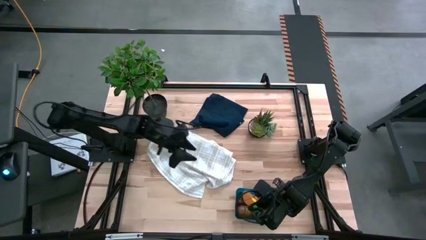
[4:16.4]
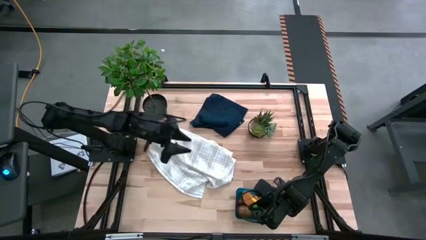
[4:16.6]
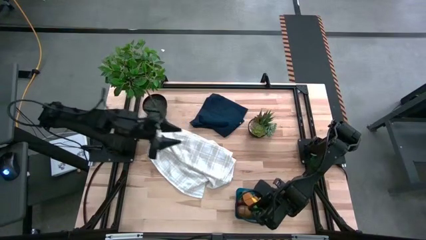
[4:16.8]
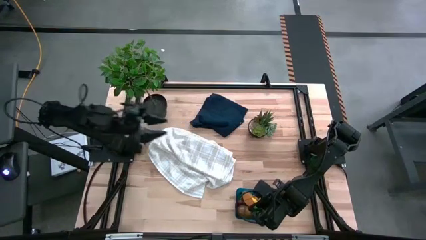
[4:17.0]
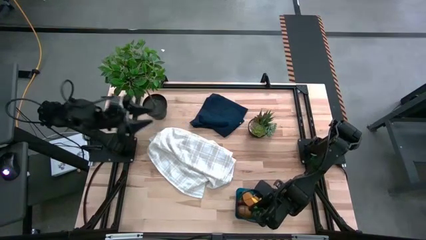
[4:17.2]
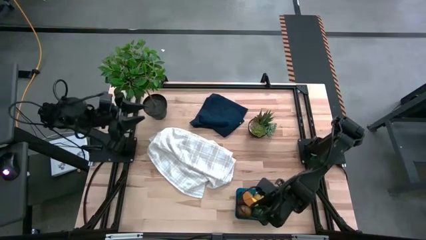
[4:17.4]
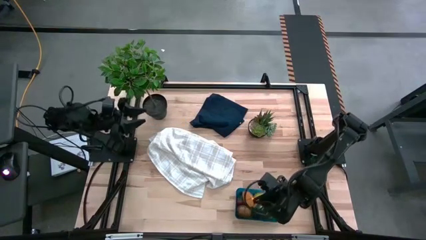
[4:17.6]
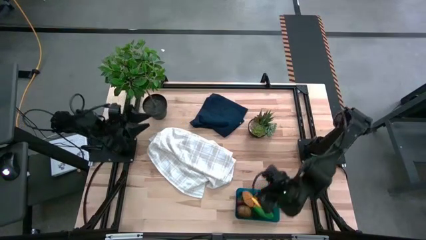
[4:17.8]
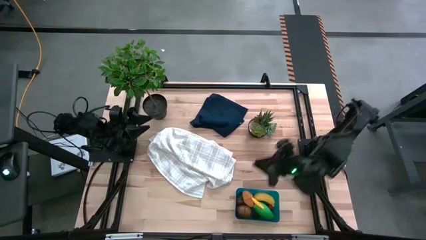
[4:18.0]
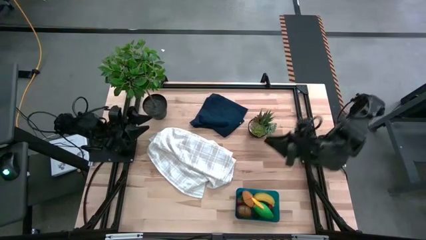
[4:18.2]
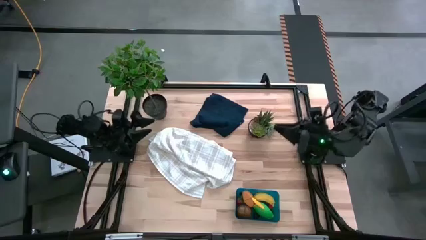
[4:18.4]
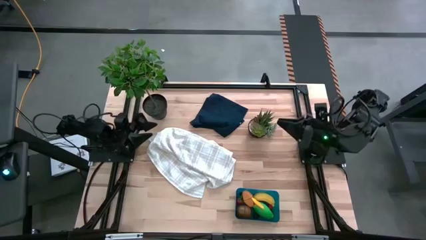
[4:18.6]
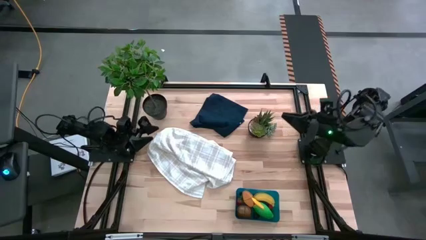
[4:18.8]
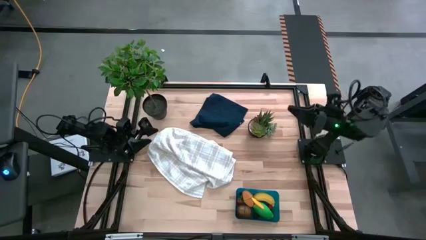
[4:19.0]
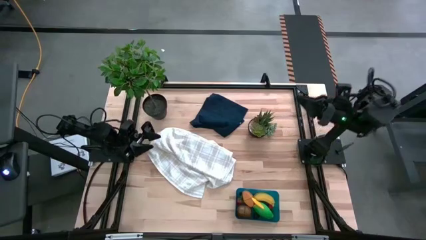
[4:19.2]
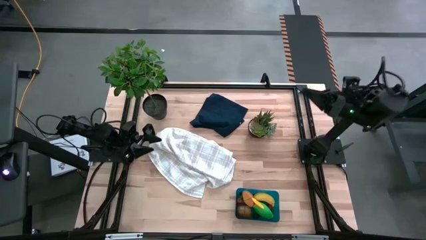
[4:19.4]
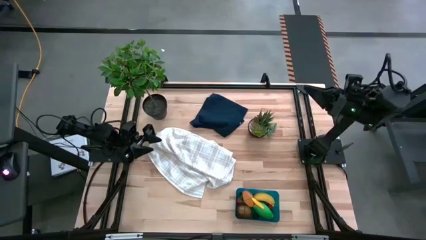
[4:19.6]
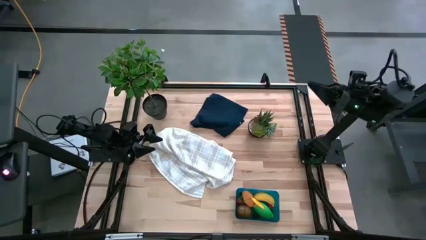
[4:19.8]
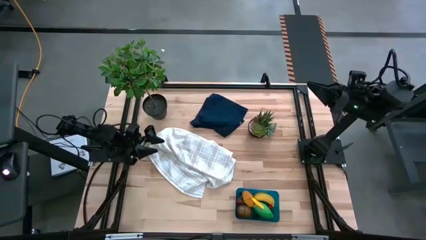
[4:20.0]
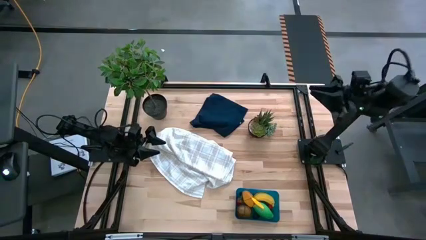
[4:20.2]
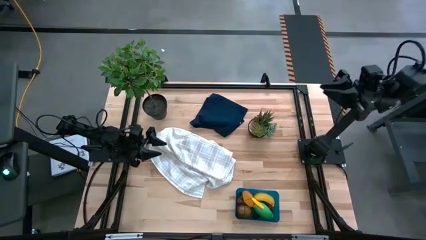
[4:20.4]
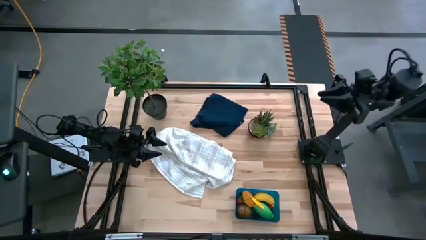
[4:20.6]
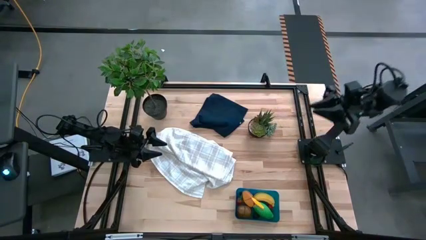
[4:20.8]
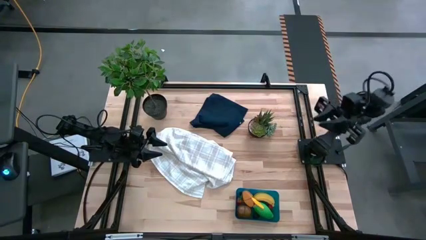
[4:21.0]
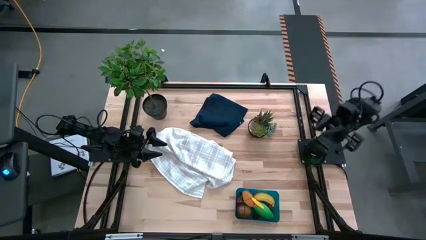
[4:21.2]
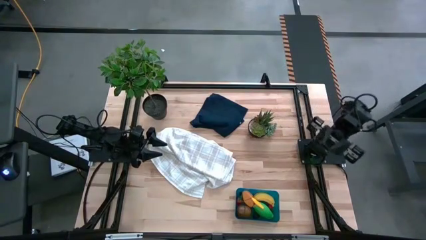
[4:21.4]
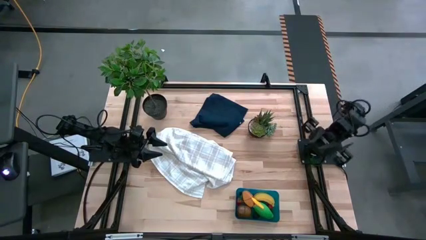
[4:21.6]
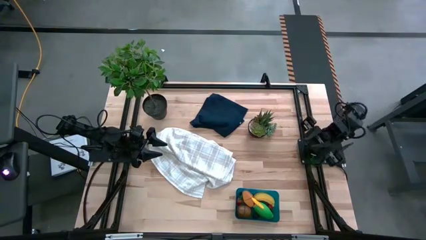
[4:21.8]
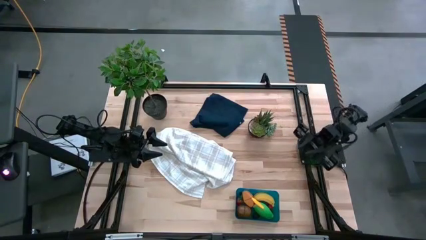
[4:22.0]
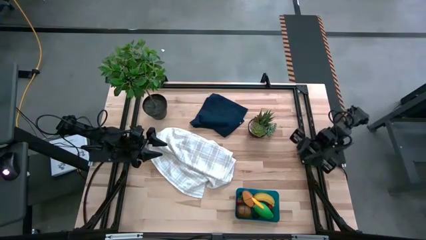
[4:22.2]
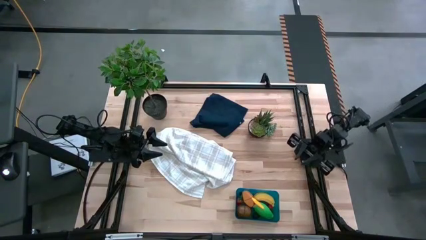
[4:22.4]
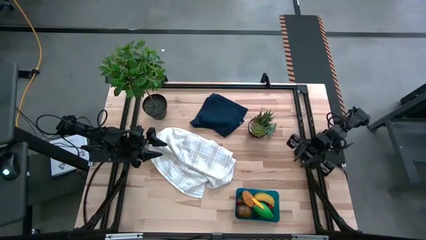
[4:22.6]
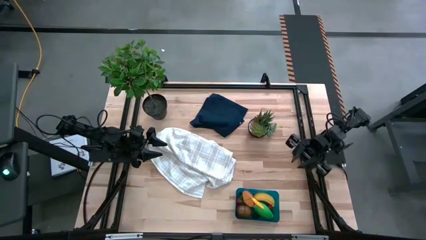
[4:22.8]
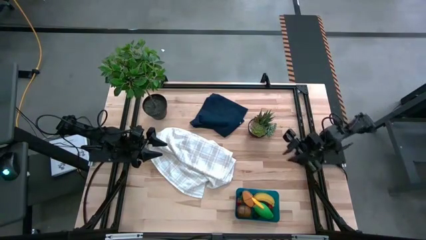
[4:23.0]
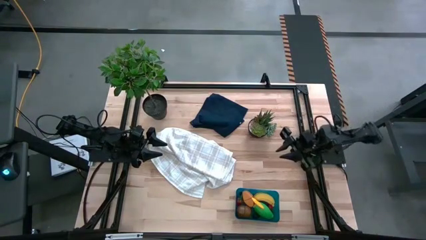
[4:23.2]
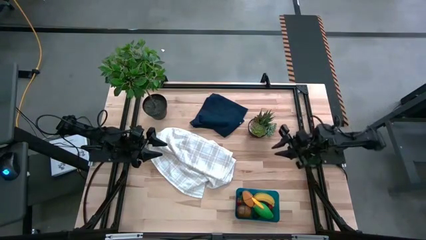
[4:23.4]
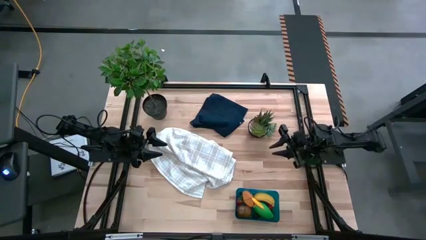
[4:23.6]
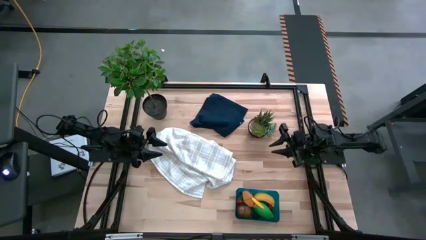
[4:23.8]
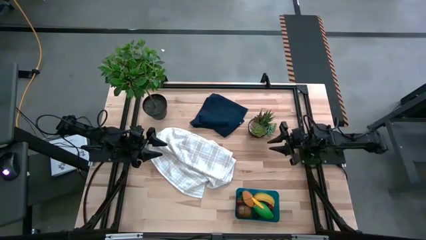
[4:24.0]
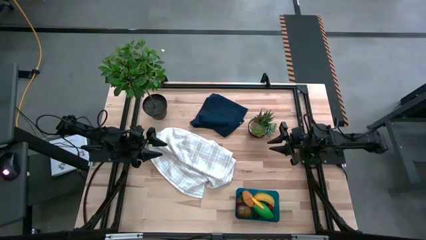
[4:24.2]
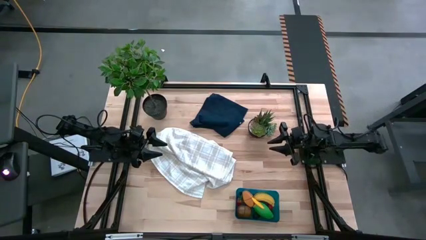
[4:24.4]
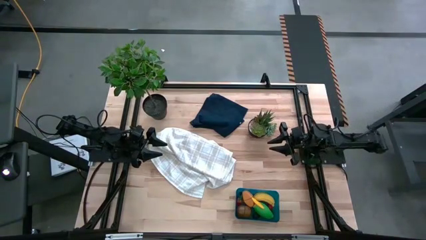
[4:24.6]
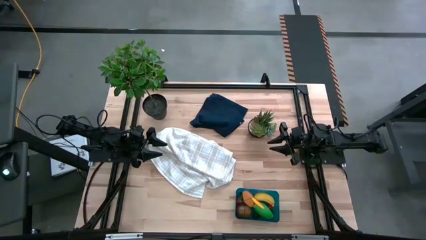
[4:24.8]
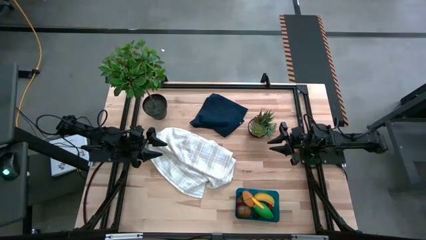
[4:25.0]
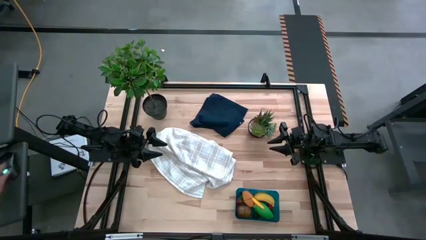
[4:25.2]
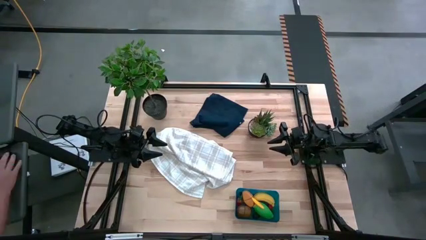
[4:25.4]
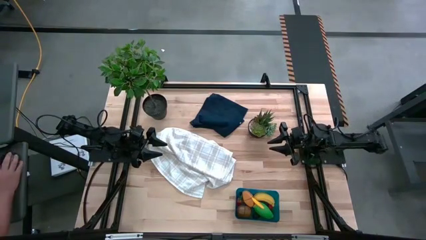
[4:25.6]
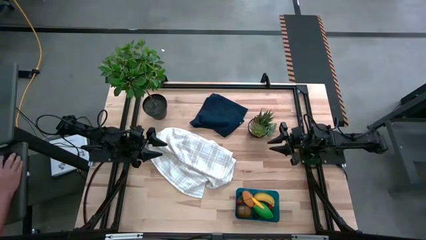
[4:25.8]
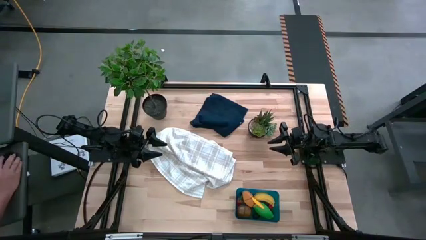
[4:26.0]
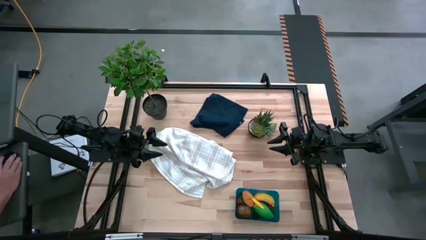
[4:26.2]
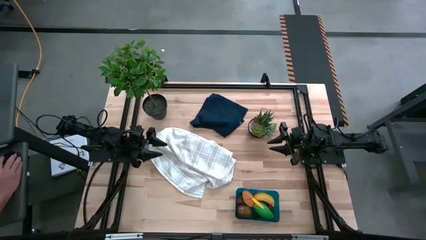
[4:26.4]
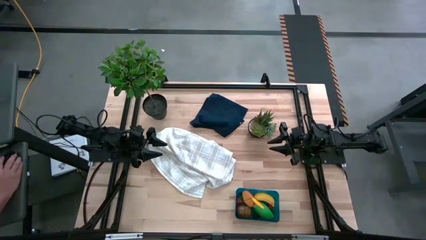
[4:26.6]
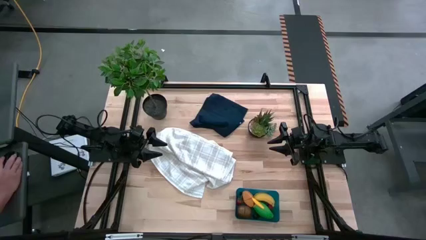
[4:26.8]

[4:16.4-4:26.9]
Task: Pick and placing Produce into tupperware
Return to Home Position

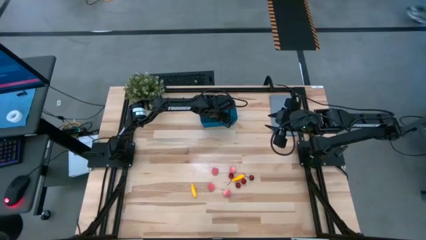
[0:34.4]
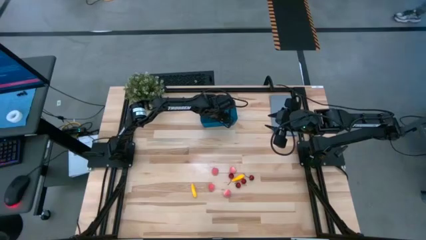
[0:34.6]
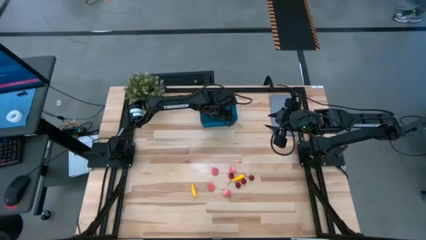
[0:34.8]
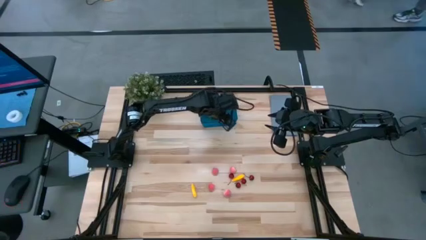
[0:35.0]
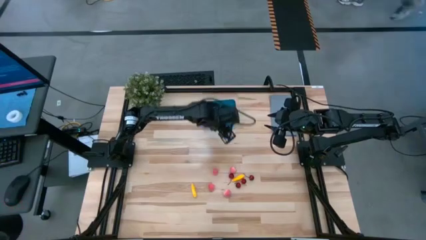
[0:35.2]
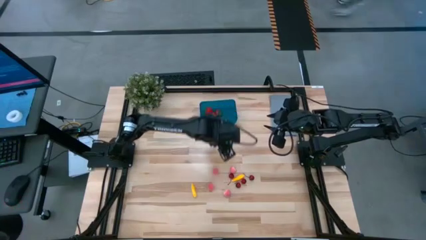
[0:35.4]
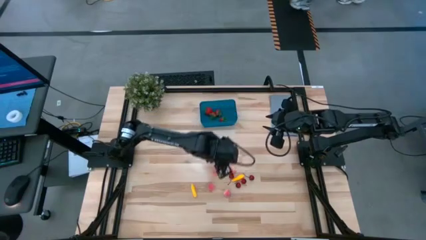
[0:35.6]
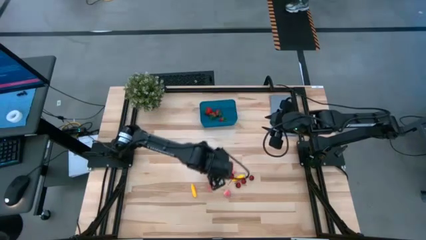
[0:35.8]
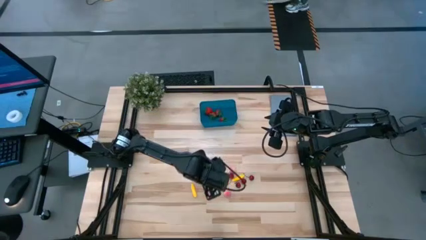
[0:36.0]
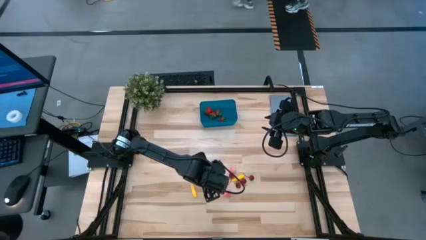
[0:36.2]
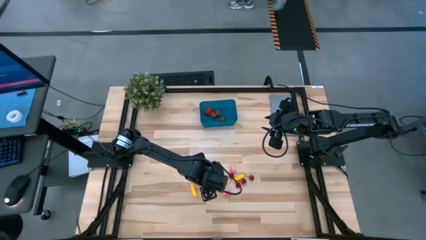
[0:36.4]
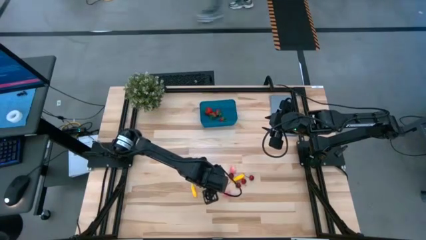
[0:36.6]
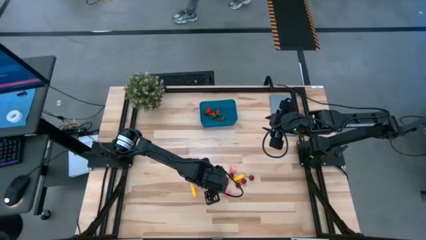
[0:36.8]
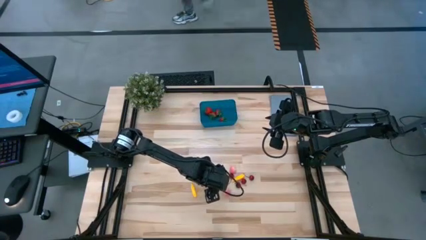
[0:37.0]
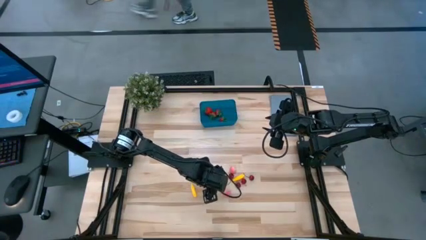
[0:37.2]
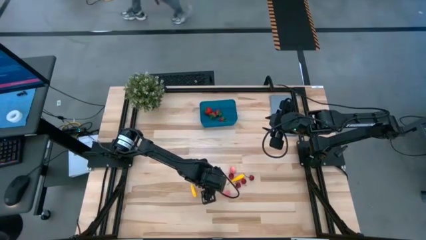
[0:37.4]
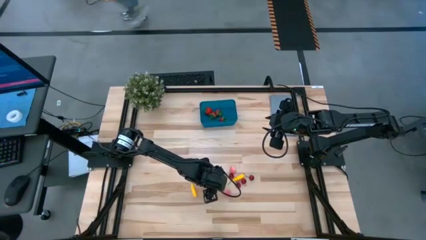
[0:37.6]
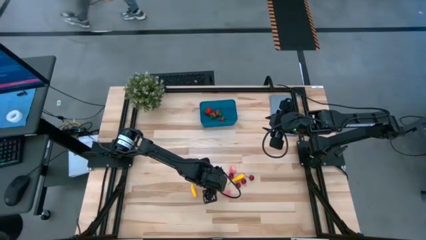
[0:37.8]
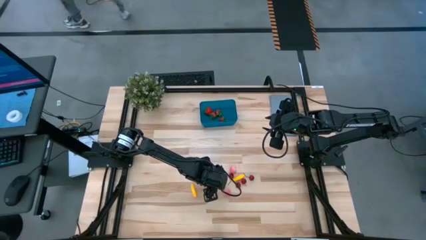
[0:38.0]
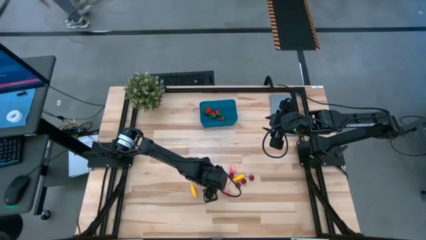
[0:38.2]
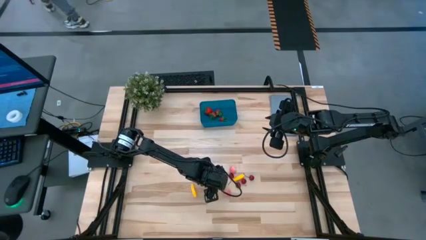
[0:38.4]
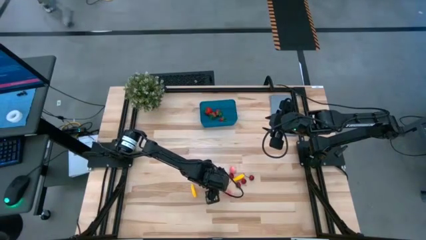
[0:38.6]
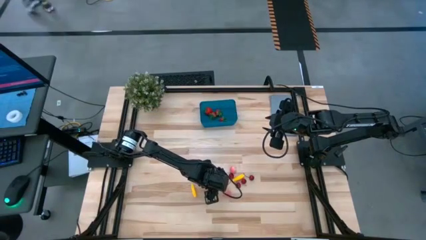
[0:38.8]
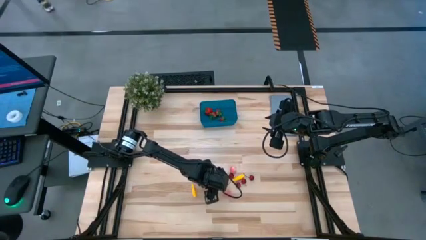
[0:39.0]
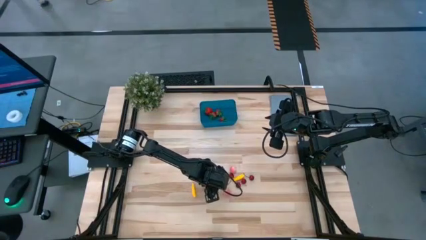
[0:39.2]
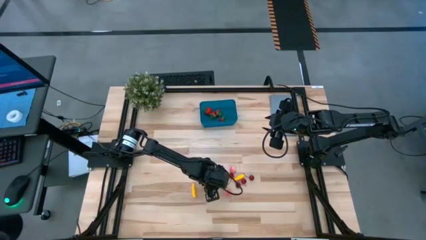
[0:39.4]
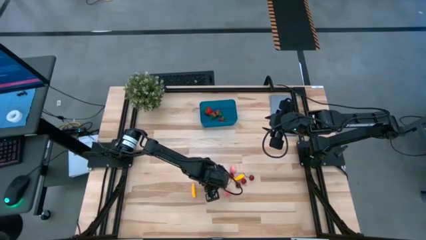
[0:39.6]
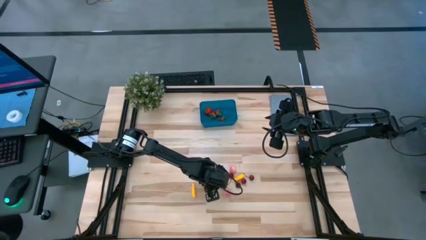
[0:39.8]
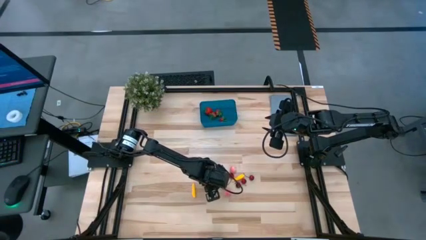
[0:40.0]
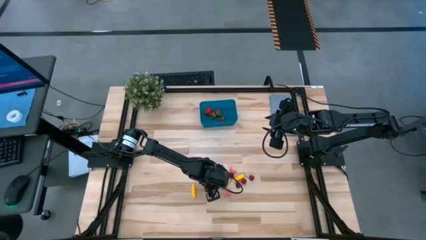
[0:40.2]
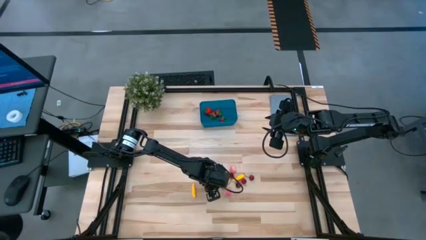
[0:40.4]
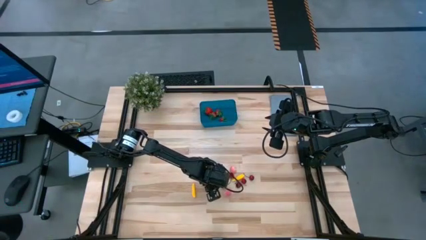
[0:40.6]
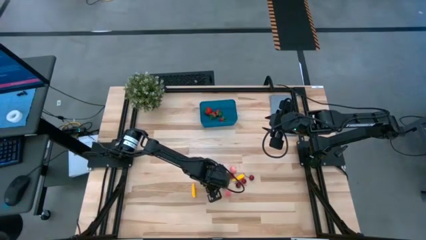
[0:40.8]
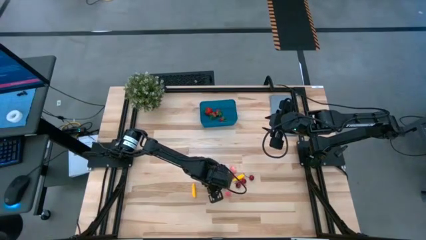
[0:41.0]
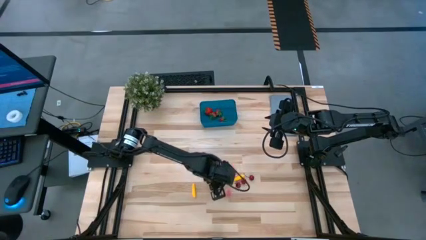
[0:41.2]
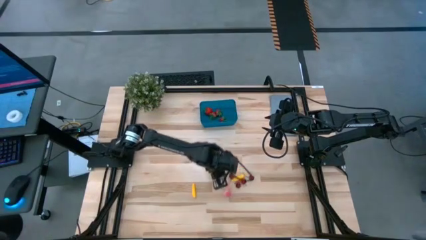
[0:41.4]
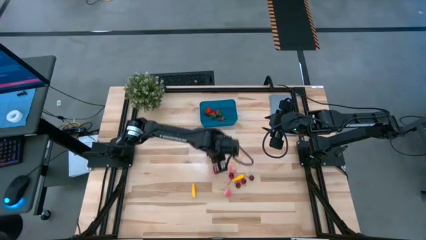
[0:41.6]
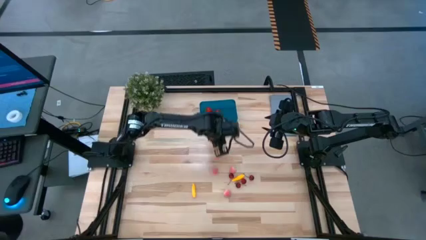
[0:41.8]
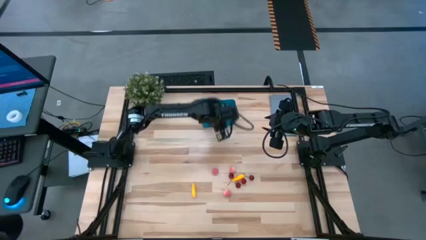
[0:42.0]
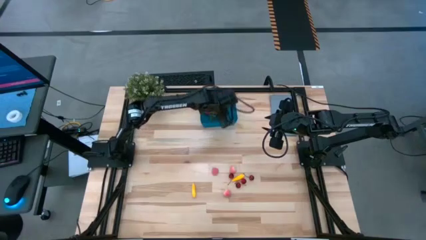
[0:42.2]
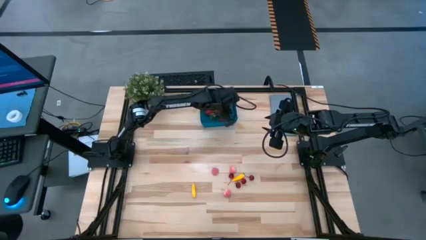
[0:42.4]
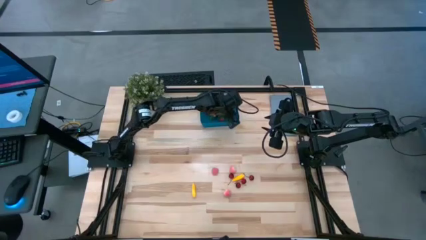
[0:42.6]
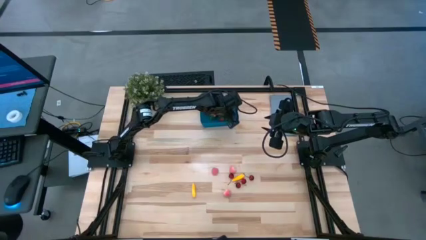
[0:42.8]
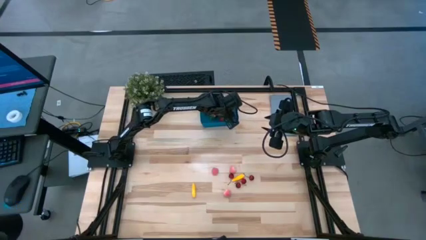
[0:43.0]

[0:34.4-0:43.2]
Task: Pick and placing Produce into tupperware
Put the peach into the blue bin
